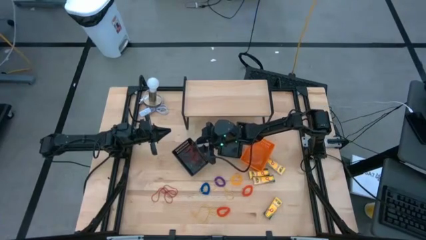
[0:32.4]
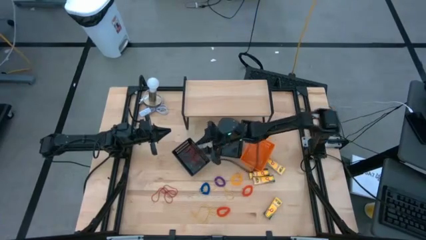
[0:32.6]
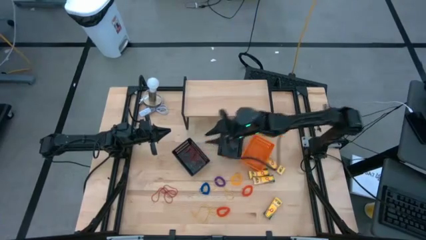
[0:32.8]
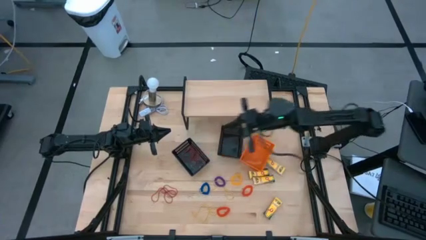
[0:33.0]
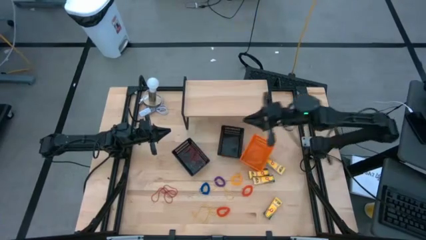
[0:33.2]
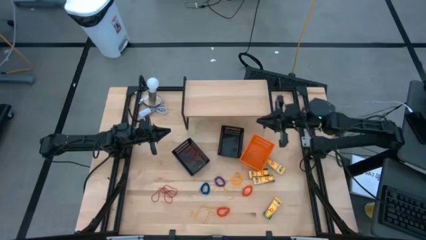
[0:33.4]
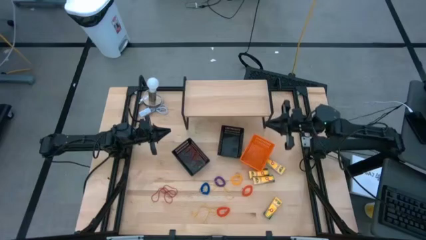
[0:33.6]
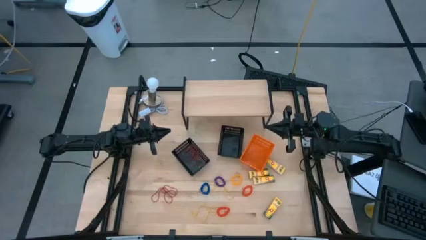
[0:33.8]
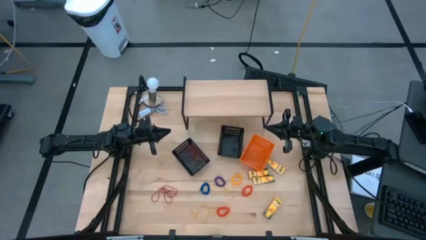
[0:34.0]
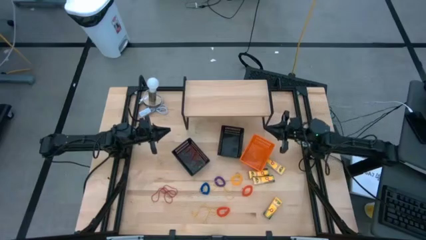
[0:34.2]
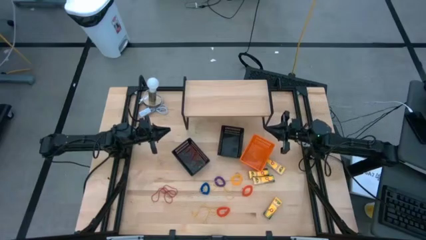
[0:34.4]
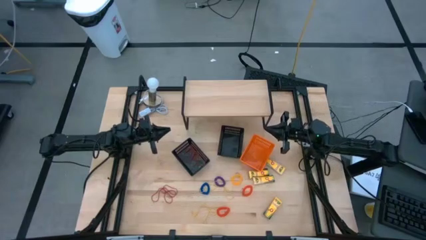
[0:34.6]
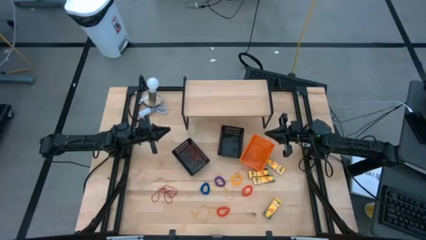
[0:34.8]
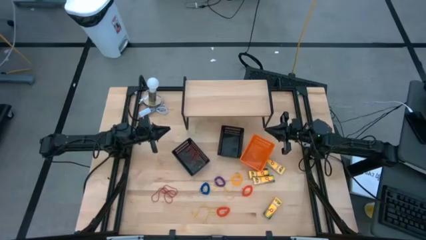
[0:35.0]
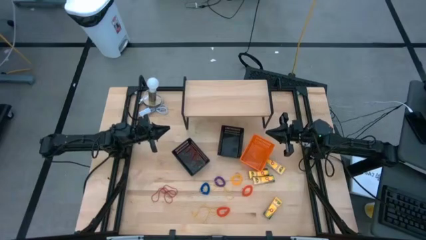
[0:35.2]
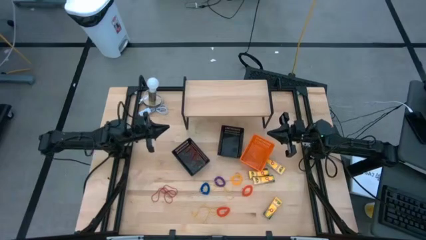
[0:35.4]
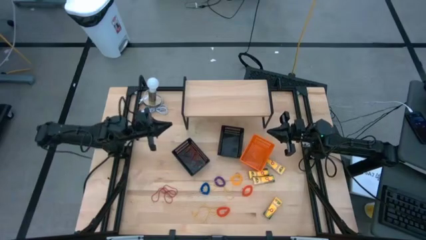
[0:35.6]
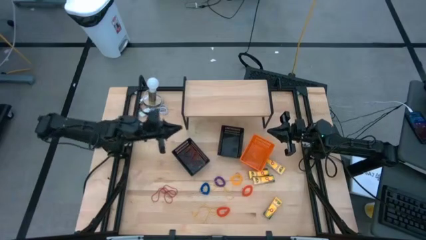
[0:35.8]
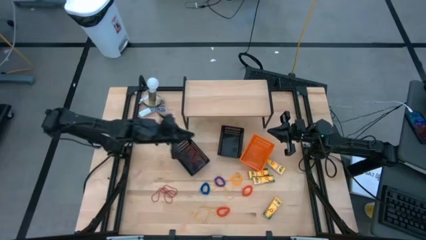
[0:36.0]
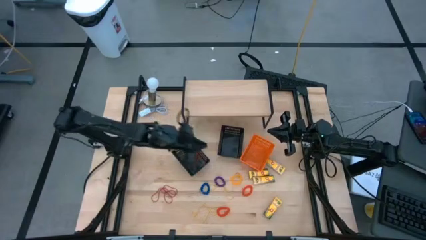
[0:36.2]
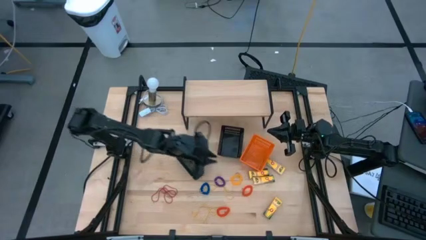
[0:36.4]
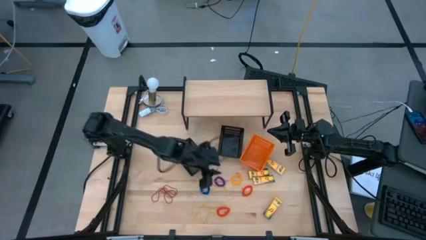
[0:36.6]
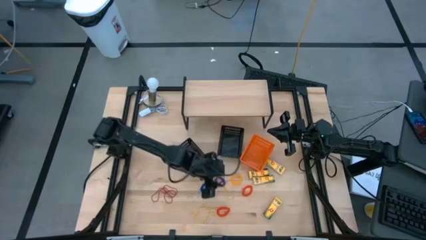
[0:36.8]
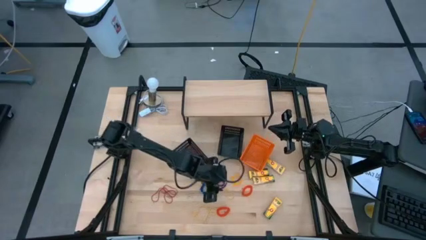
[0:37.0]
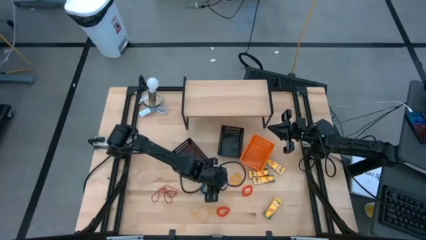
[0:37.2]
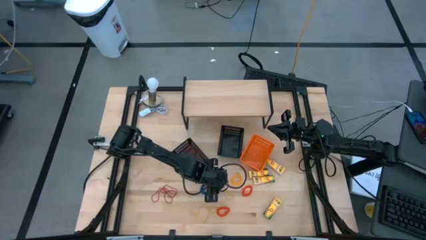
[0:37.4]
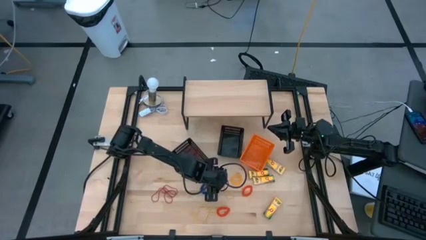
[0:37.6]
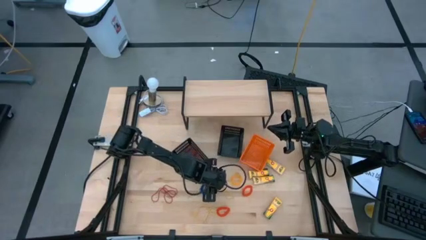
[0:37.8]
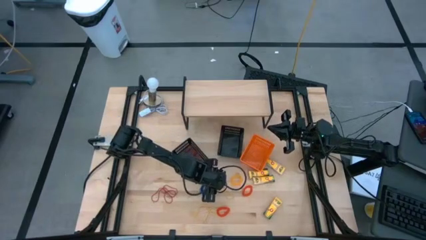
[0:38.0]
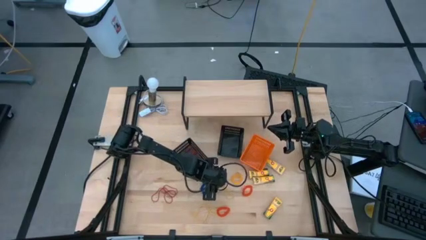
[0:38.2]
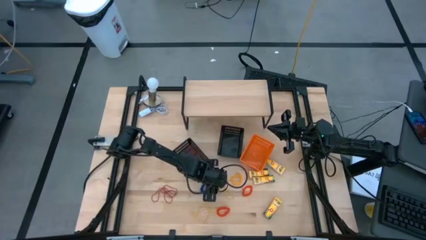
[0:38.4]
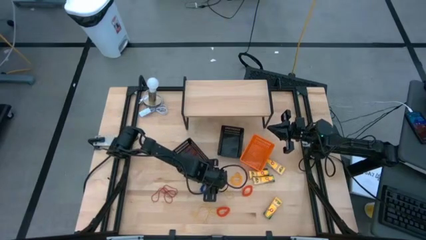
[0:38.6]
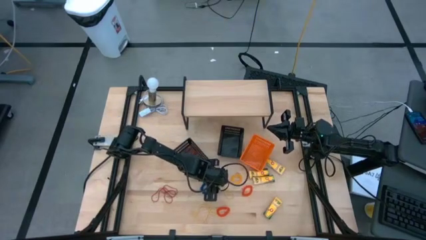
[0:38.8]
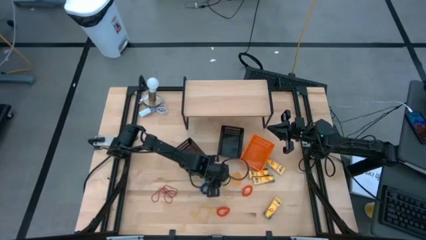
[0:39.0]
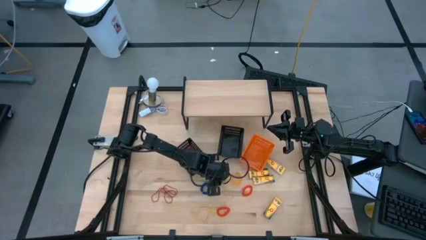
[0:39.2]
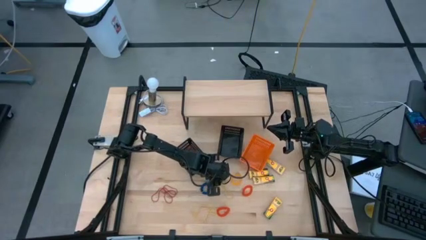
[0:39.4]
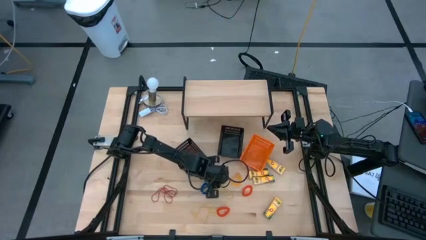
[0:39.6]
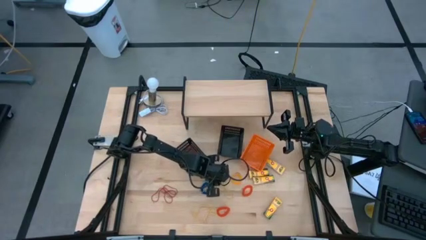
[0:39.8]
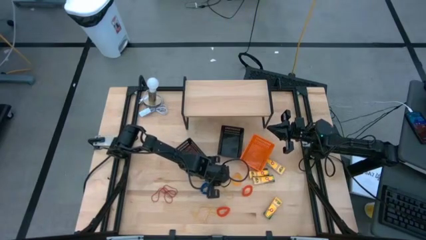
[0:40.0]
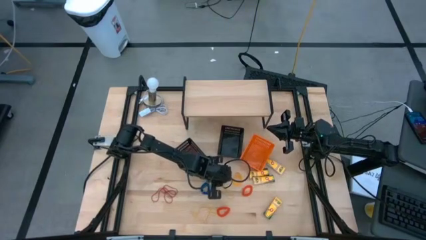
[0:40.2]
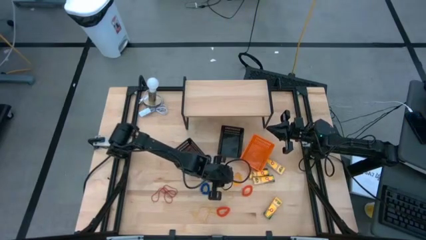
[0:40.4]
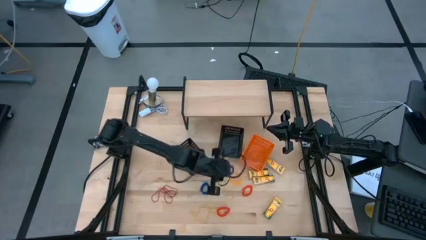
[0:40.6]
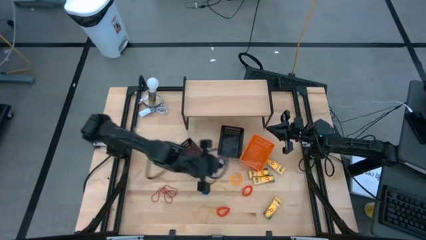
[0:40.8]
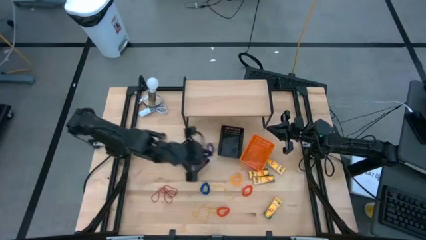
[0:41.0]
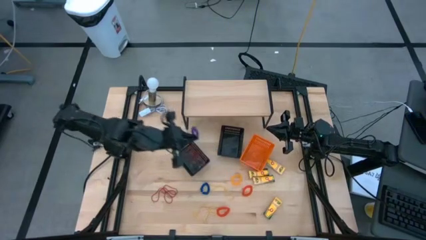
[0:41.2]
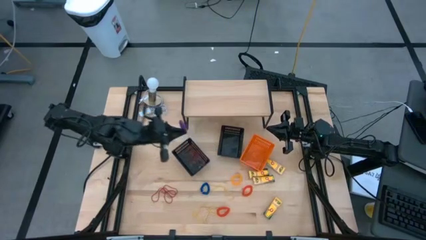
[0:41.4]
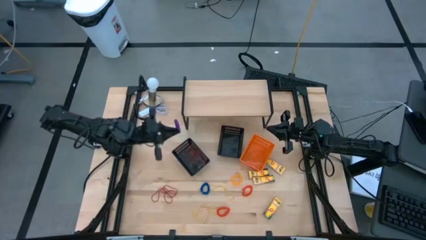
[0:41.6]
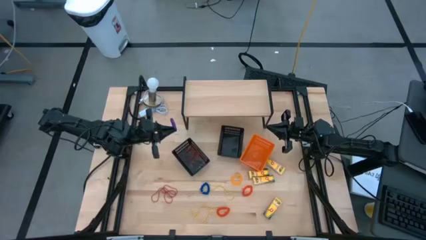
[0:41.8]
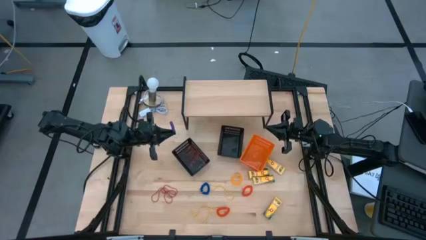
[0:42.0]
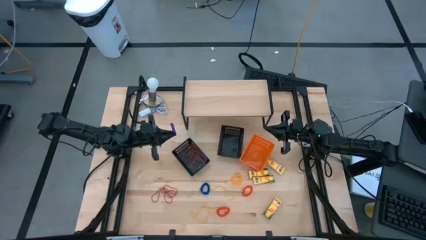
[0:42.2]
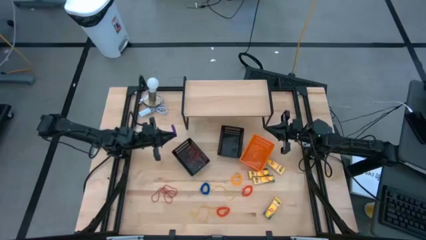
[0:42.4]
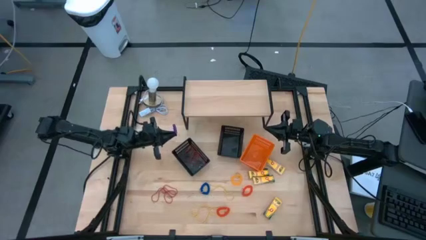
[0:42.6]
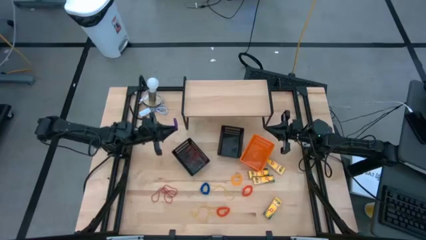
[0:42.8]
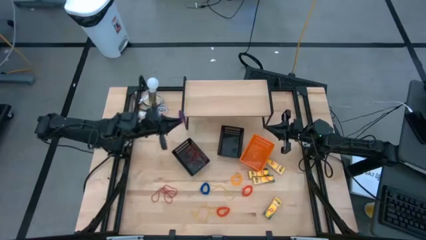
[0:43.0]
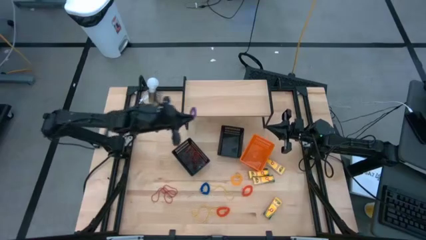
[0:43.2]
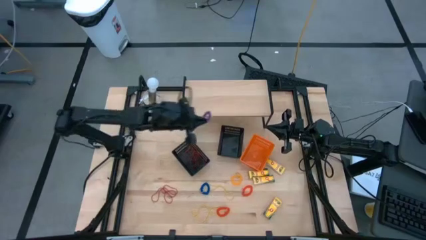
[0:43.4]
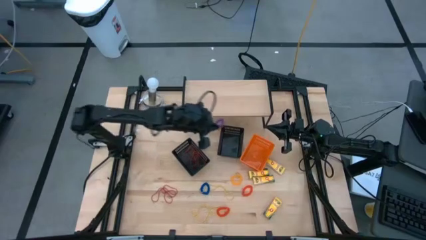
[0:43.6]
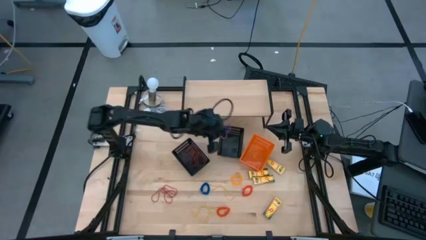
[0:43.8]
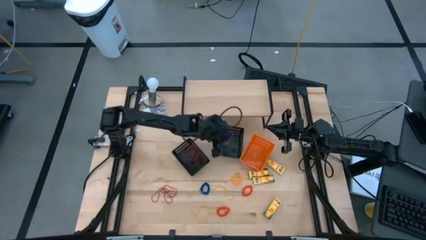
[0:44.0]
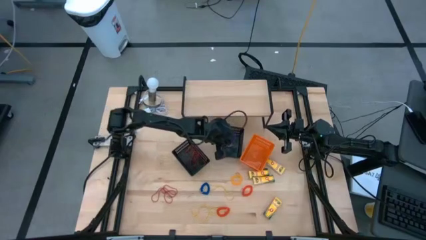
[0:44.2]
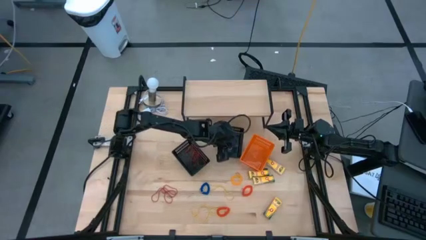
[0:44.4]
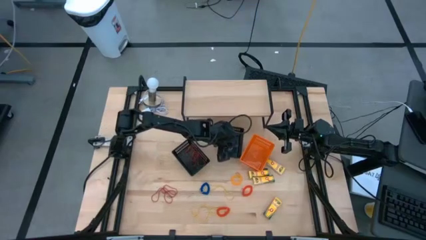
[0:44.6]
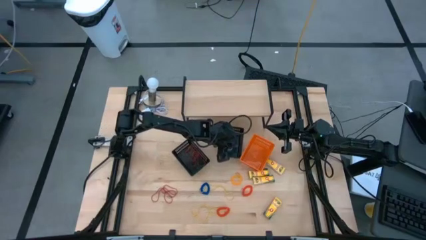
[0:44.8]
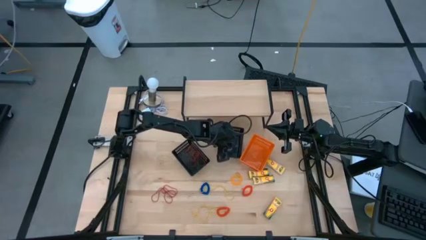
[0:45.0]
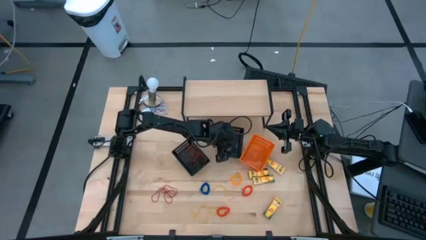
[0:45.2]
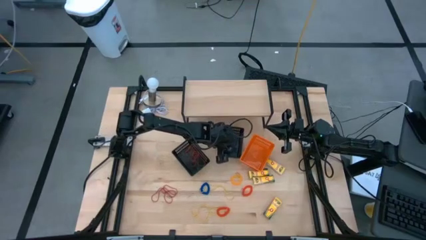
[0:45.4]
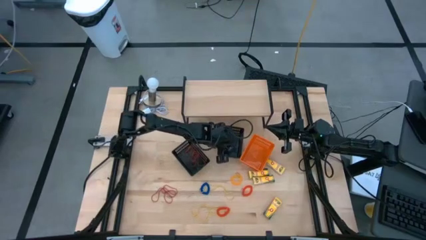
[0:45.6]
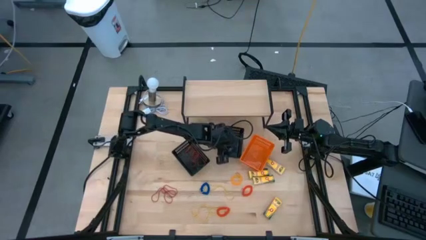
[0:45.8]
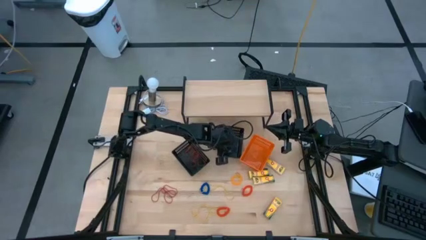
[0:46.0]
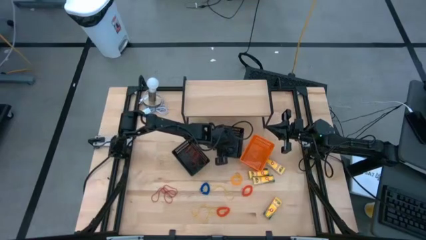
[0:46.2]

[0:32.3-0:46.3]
Task: Pick & Place Office Desk Supplies
Put the purple spring keychain into the right black bin
